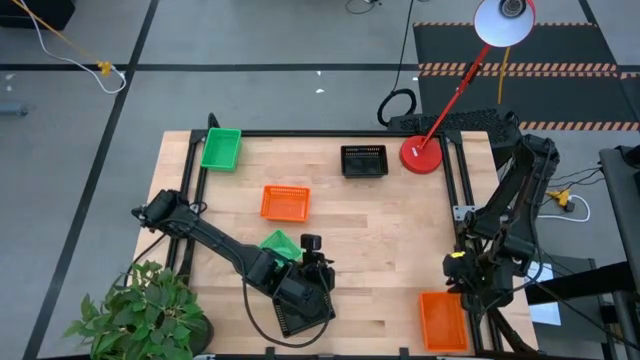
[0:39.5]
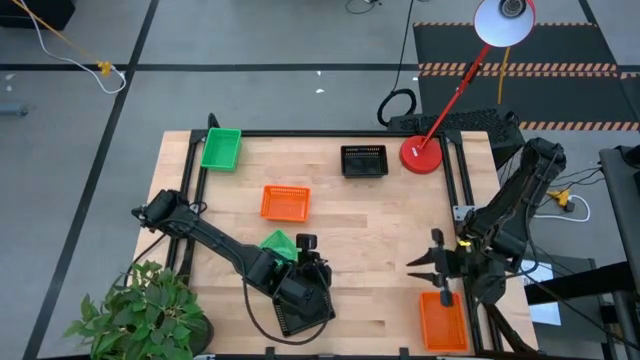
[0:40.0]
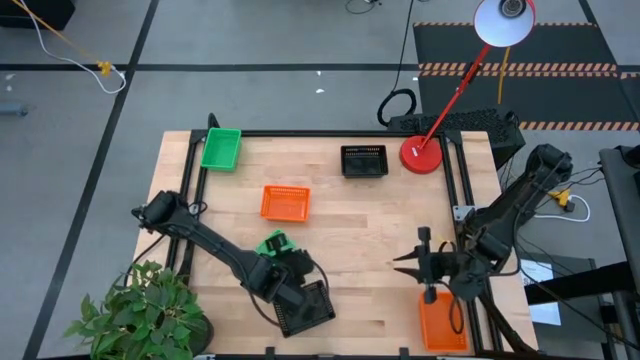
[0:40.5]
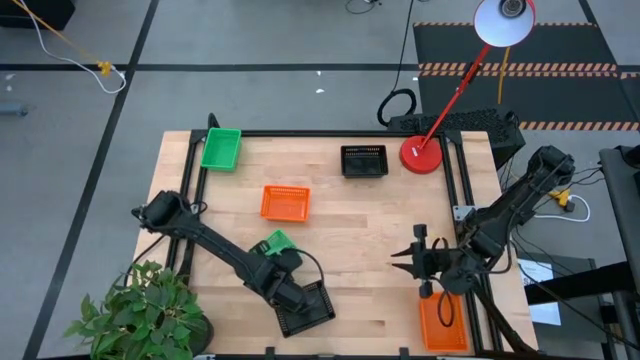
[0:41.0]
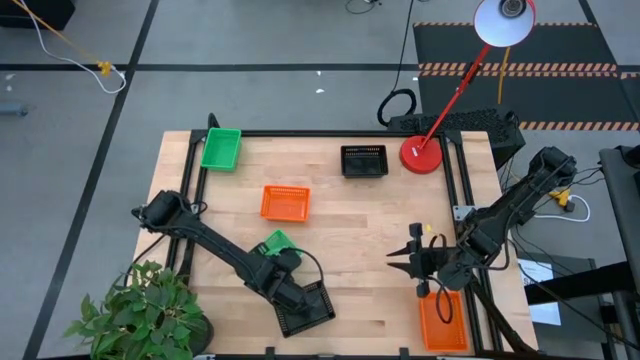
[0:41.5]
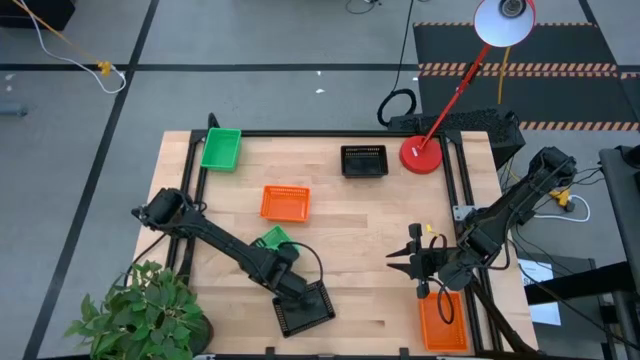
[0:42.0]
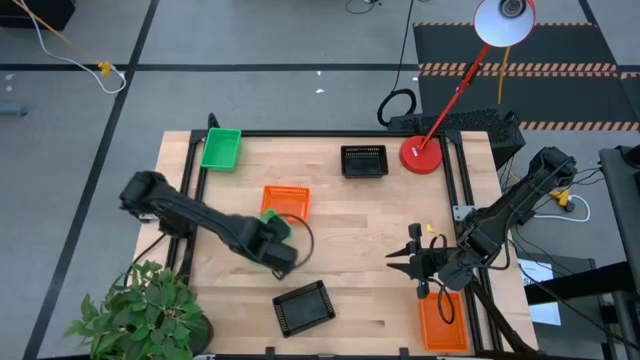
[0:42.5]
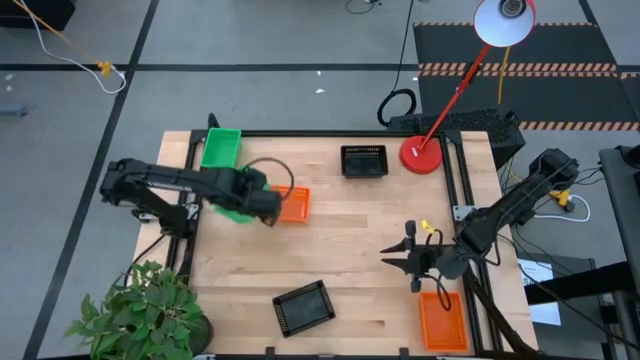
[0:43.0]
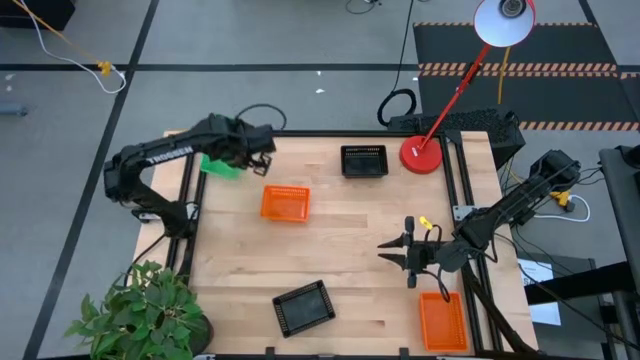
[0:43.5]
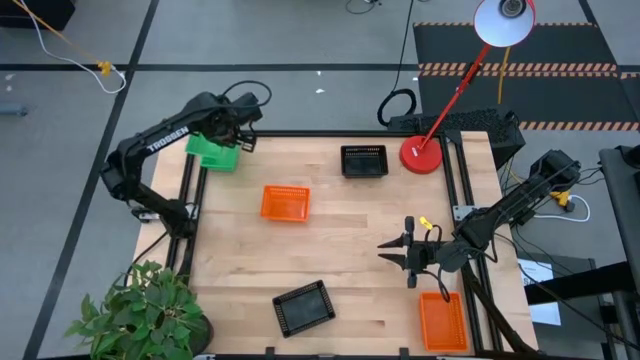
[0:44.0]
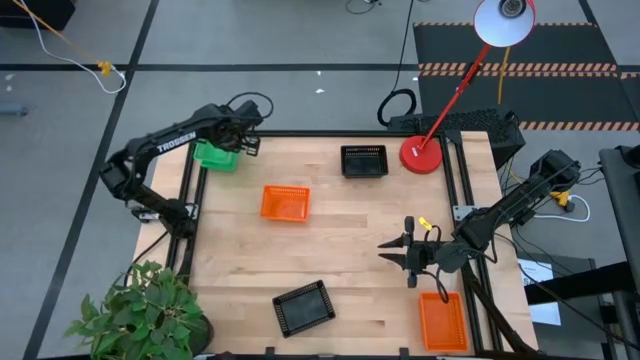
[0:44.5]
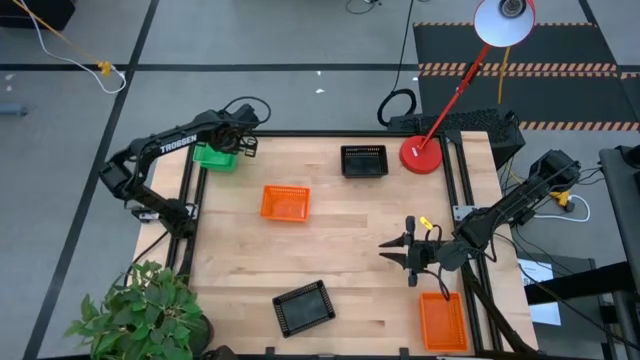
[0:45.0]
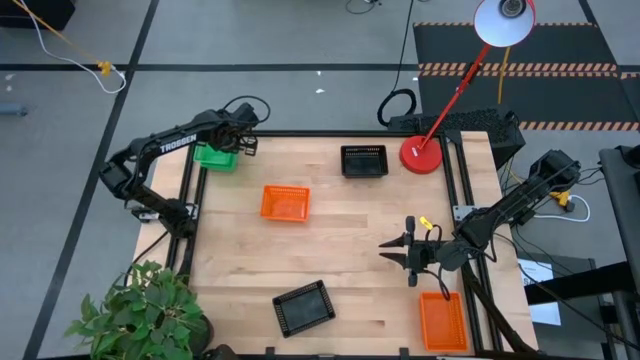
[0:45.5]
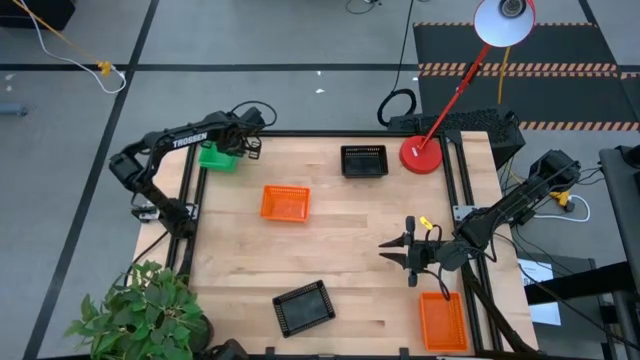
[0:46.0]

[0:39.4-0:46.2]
Stack the bottom green bin on top of the top green bin

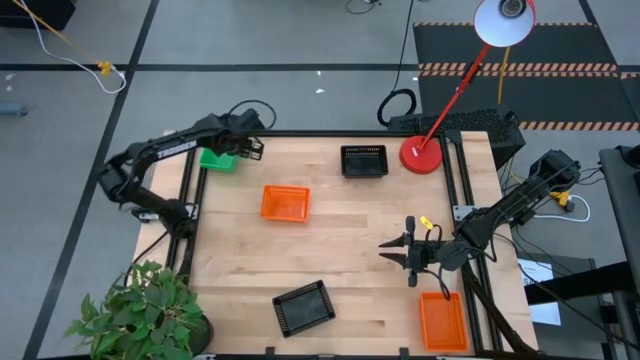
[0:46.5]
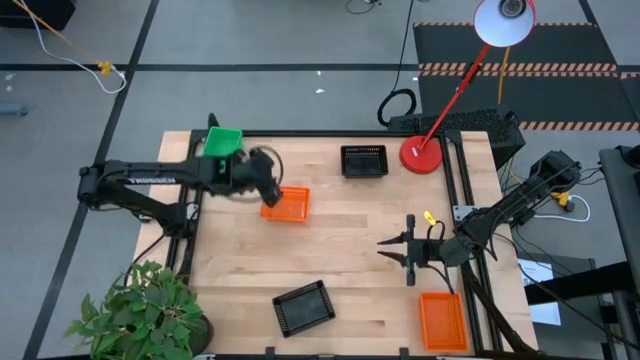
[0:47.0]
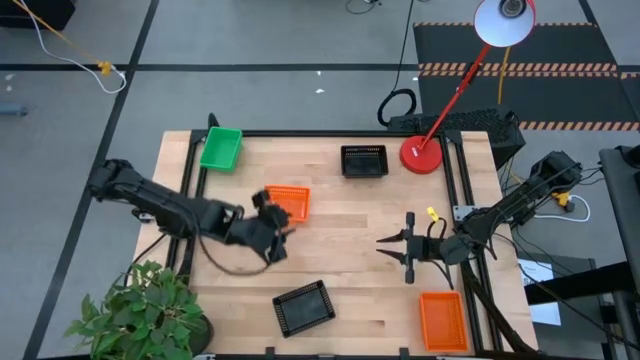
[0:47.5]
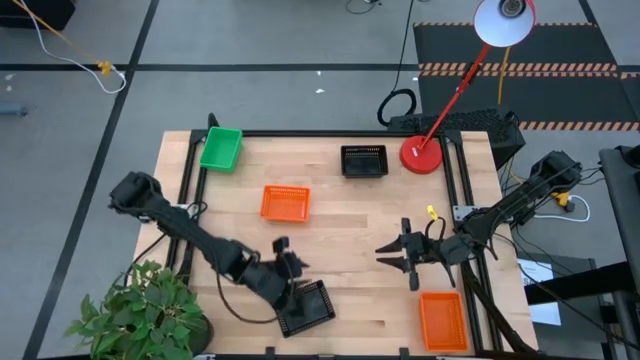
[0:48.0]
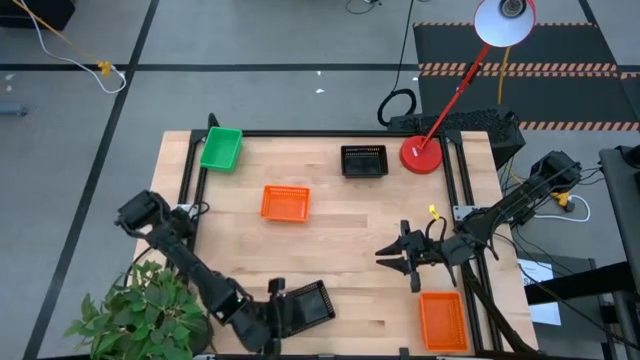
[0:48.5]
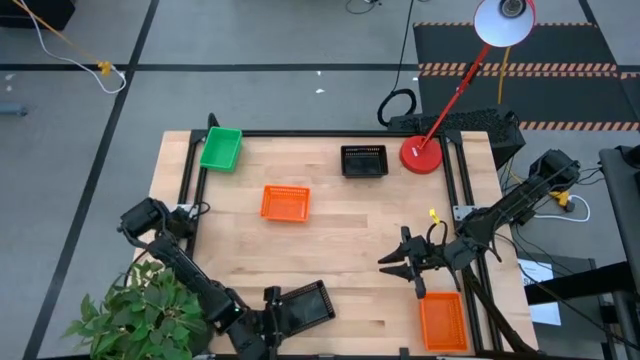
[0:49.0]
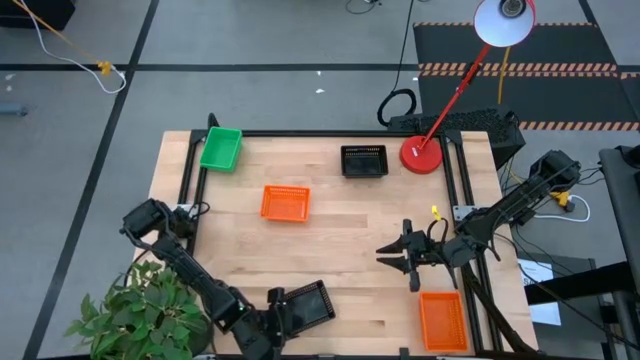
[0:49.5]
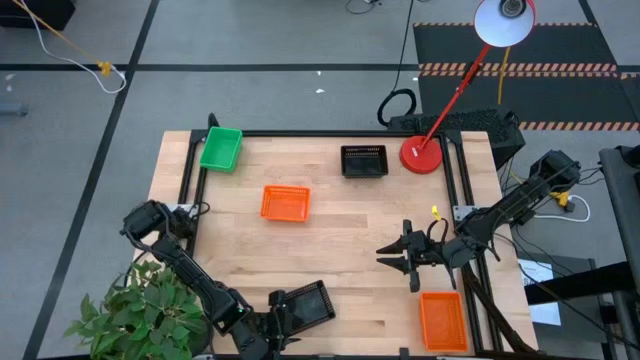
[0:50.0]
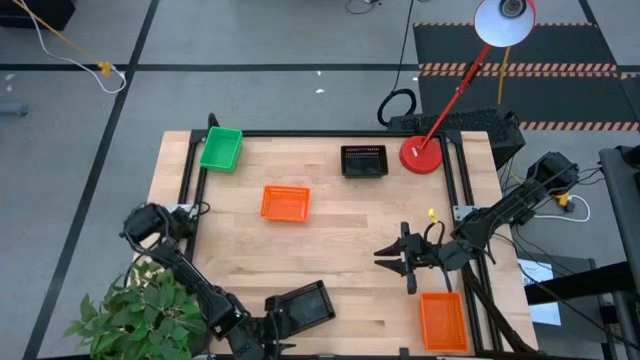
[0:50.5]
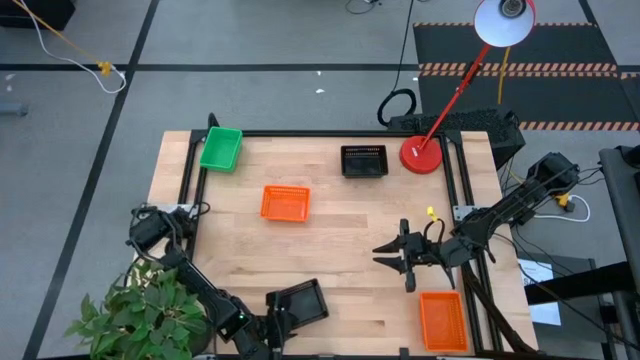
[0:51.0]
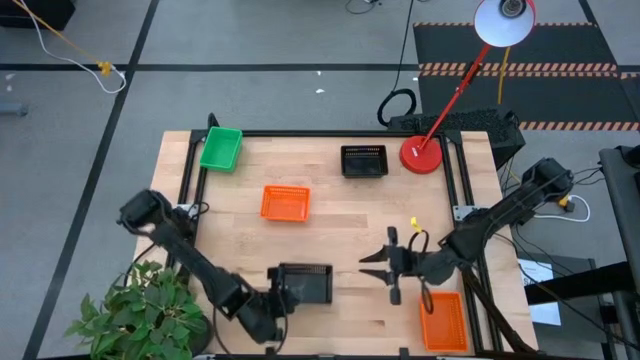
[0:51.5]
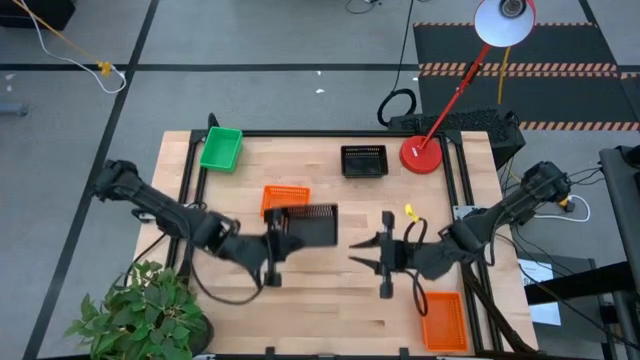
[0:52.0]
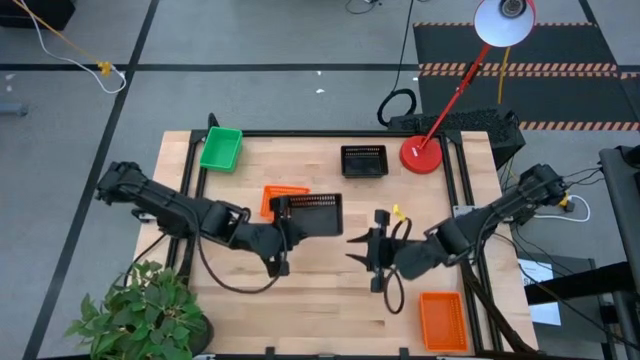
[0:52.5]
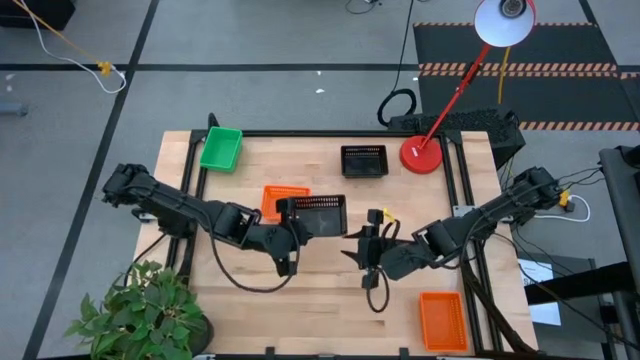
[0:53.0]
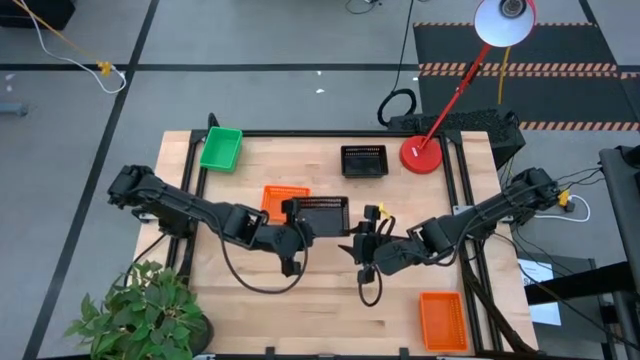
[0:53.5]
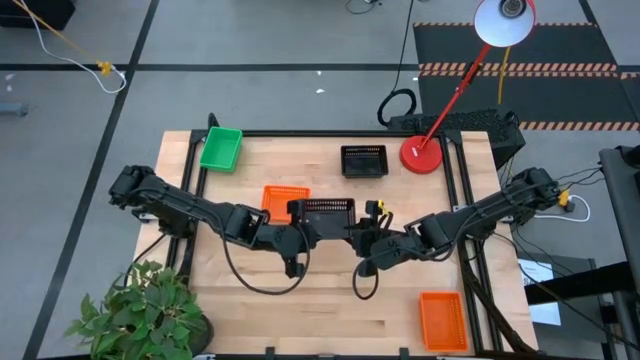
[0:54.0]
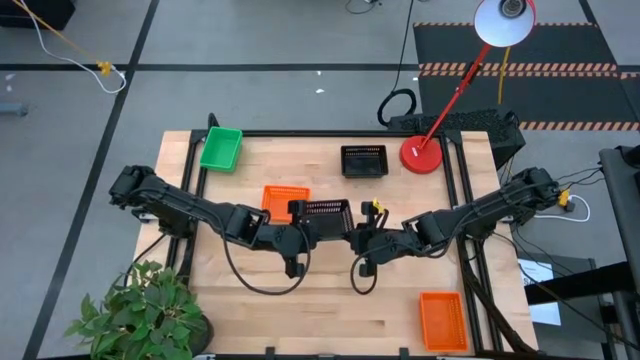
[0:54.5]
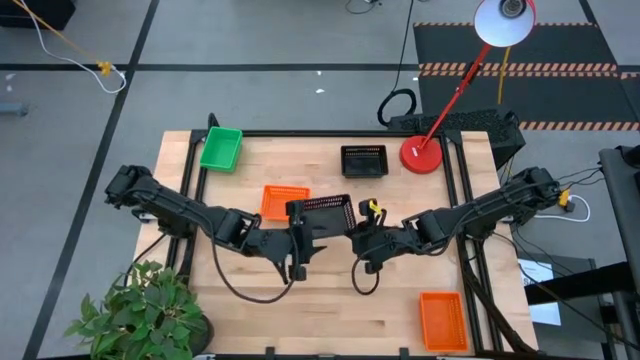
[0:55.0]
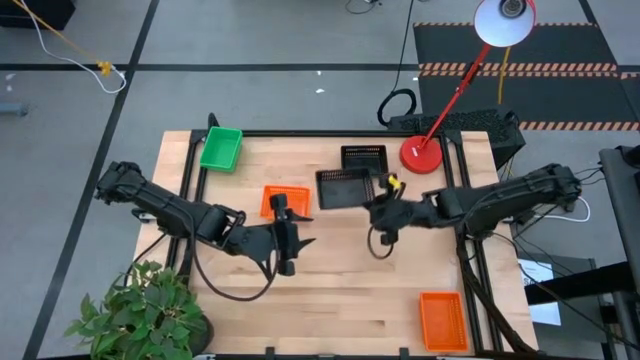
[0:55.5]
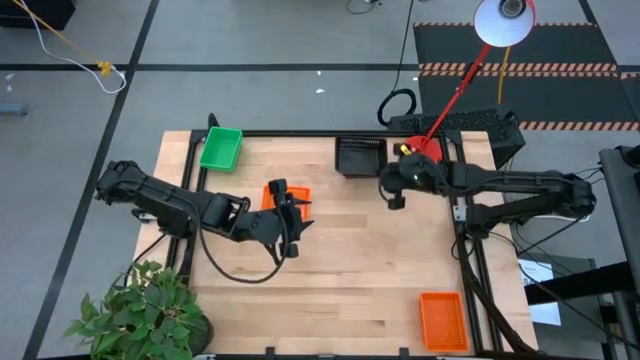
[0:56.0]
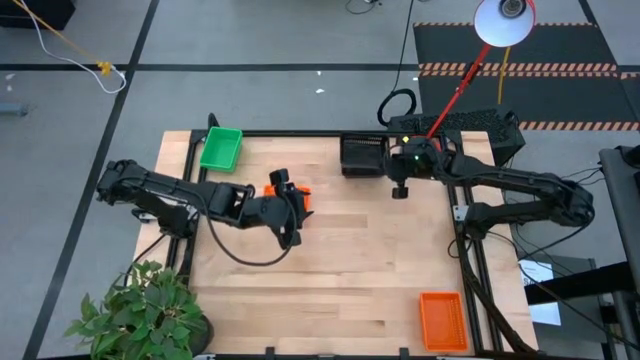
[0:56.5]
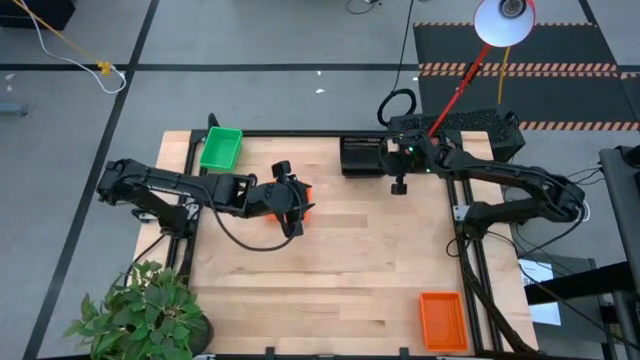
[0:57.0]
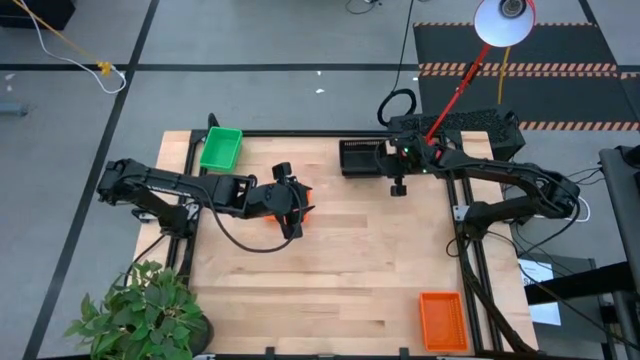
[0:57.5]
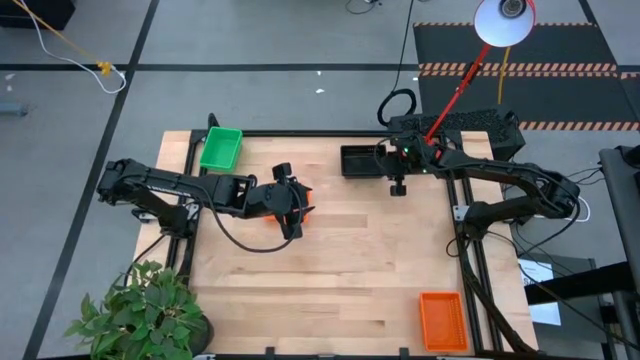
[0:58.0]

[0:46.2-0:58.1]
Stack the bottom black bin on top of the top black bin

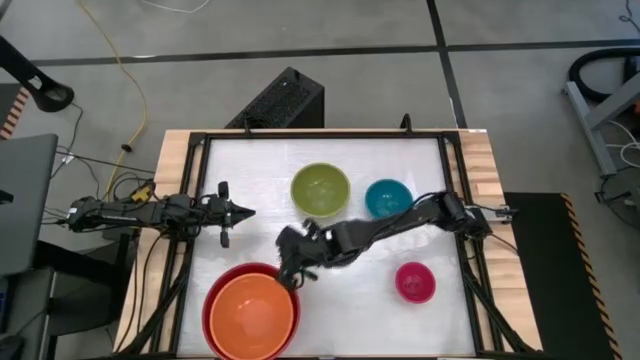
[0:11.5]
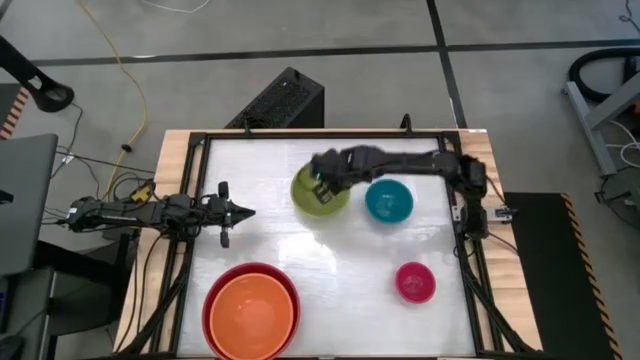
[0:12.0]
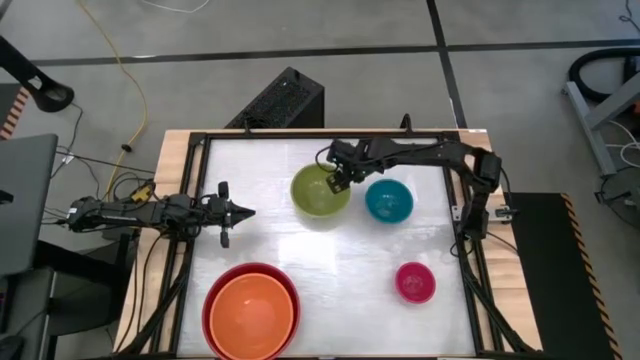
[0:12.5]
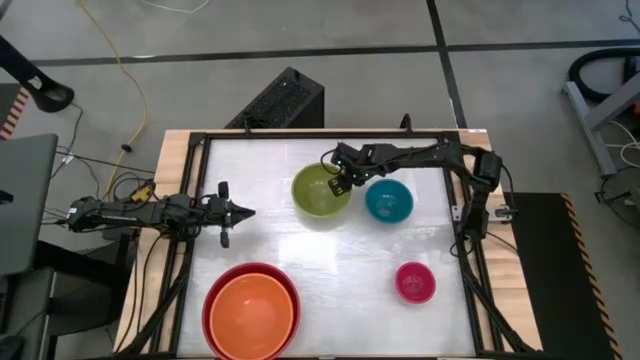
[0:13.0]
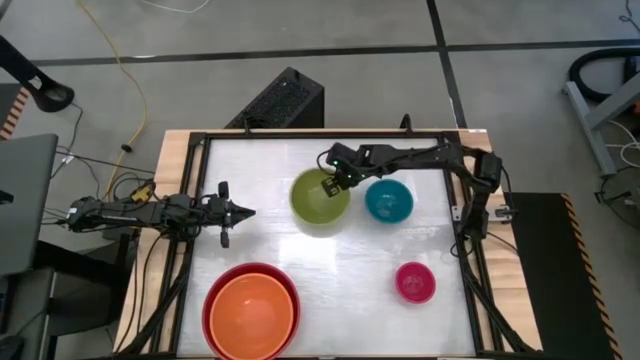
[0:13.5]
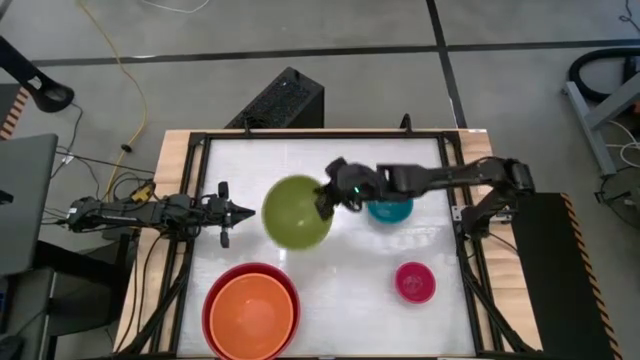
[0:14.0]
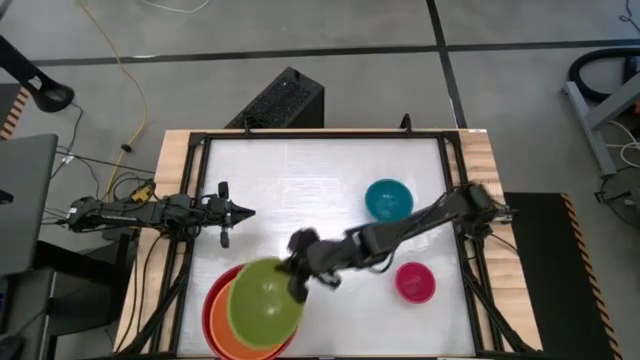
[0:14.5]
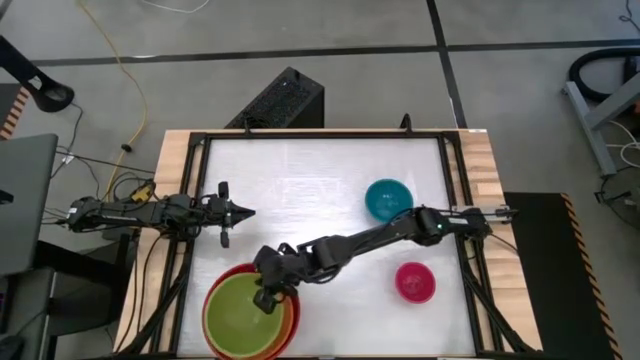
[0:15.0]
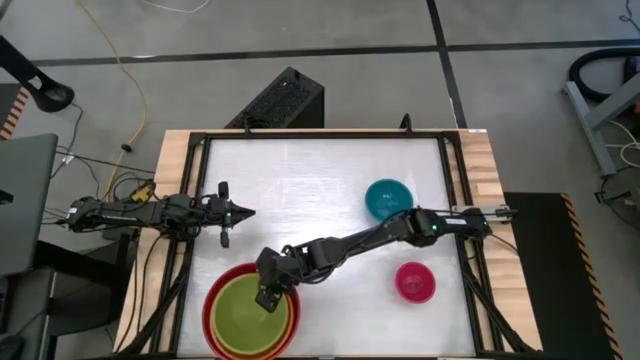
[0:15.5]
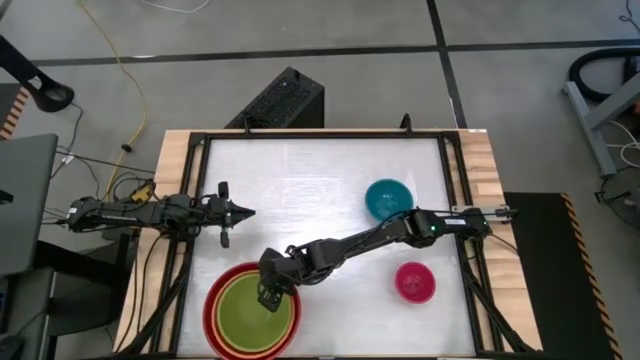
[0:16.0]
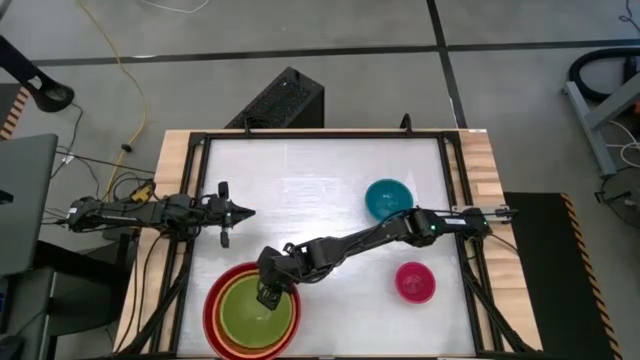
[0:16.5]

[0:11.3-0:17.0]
Stack the green bowl on top of the orange stacked bowls
